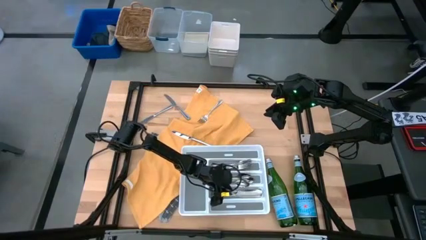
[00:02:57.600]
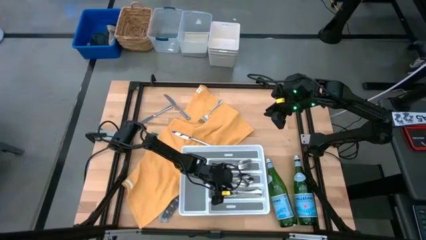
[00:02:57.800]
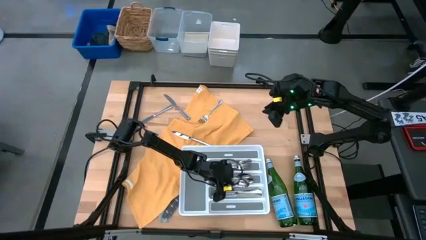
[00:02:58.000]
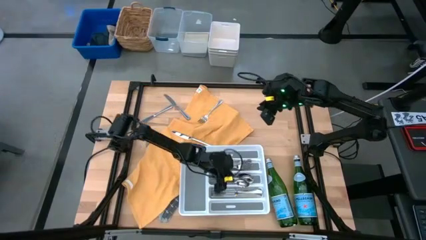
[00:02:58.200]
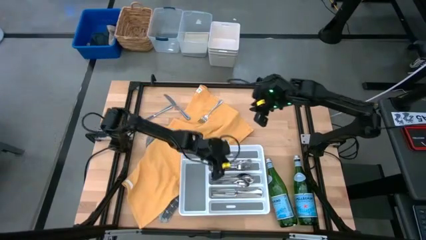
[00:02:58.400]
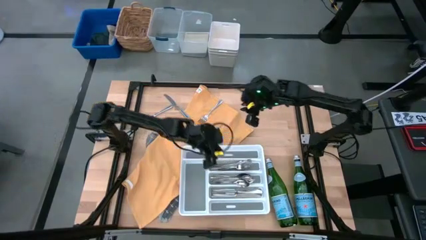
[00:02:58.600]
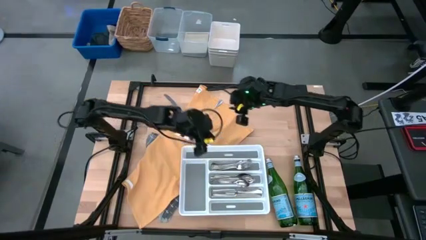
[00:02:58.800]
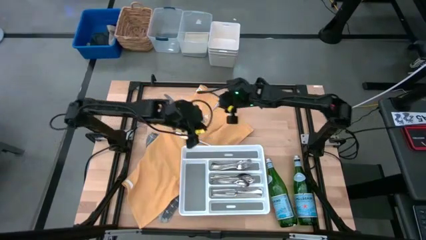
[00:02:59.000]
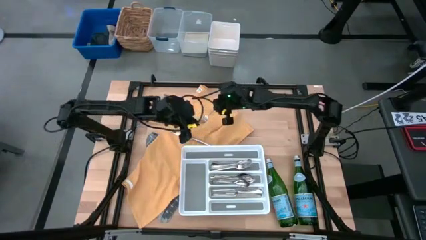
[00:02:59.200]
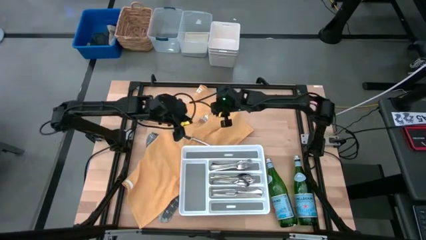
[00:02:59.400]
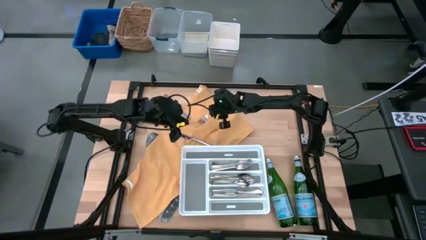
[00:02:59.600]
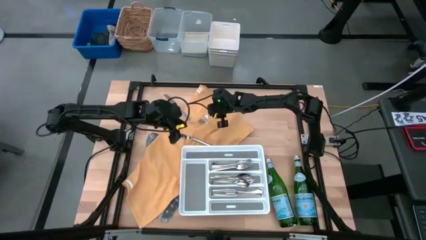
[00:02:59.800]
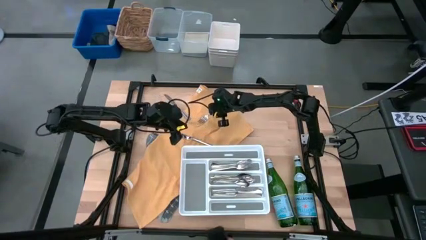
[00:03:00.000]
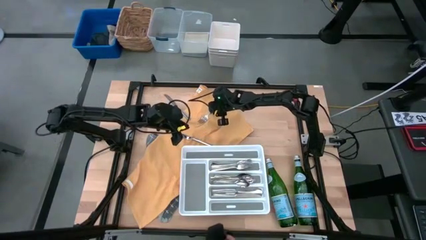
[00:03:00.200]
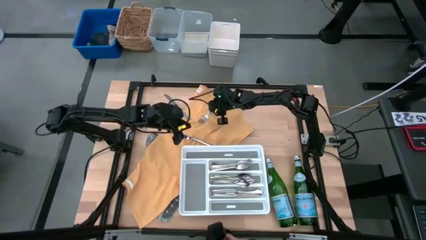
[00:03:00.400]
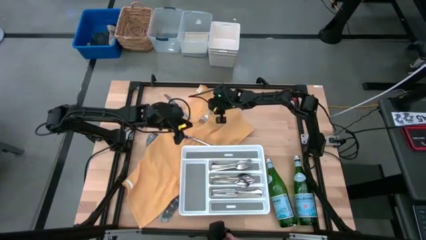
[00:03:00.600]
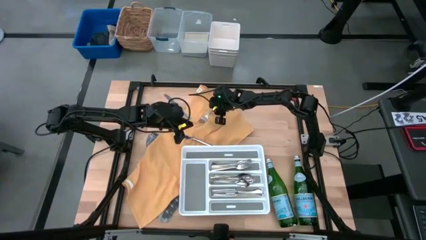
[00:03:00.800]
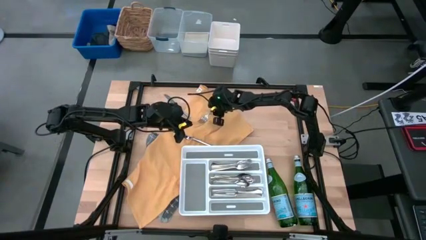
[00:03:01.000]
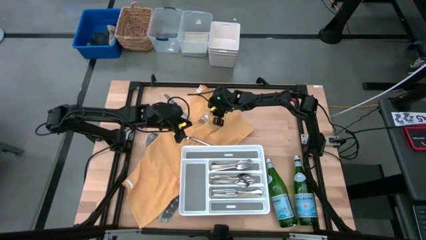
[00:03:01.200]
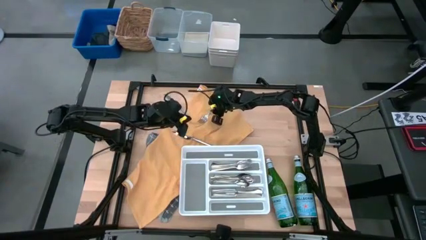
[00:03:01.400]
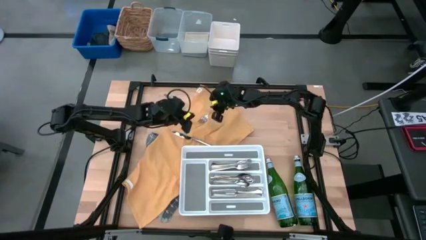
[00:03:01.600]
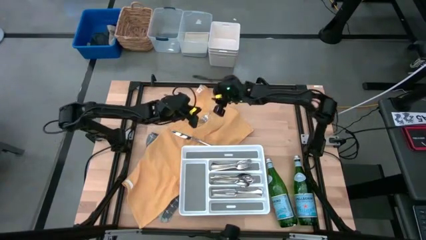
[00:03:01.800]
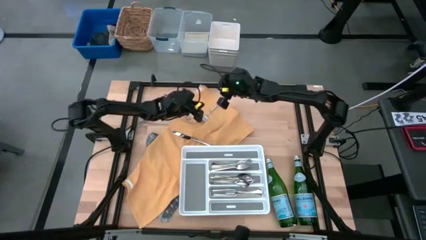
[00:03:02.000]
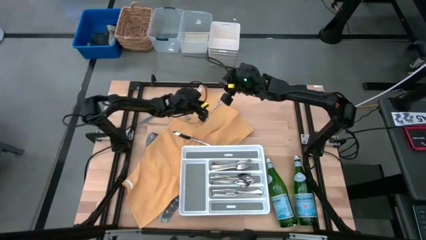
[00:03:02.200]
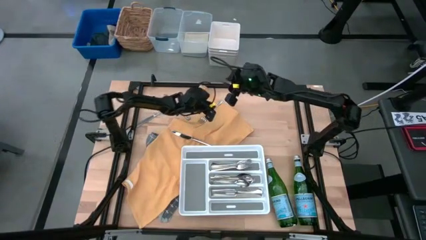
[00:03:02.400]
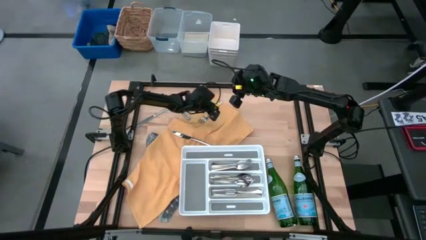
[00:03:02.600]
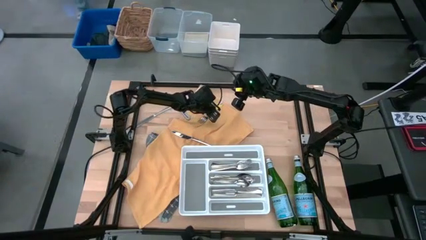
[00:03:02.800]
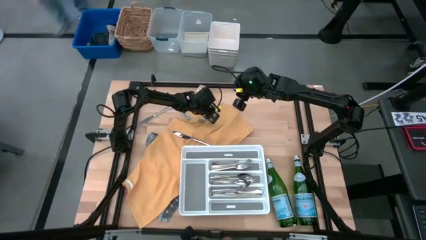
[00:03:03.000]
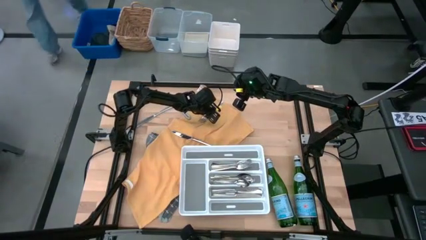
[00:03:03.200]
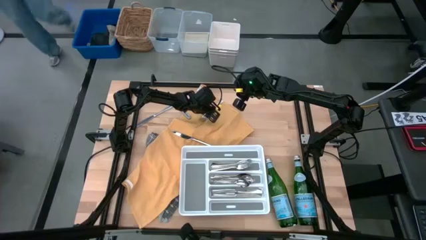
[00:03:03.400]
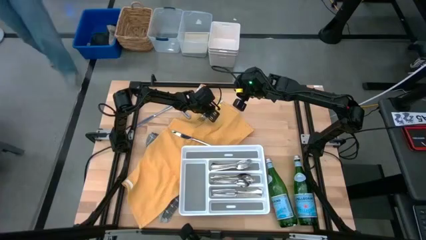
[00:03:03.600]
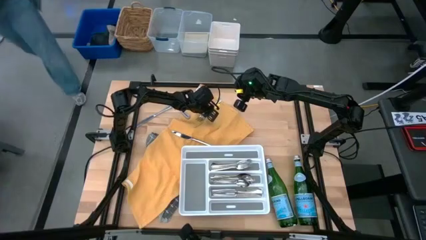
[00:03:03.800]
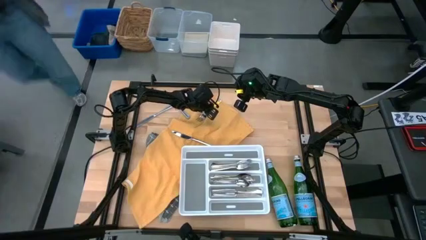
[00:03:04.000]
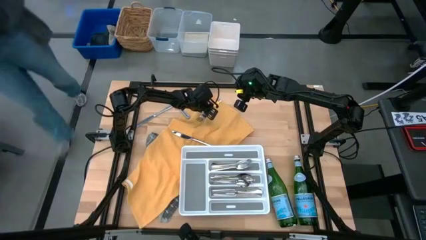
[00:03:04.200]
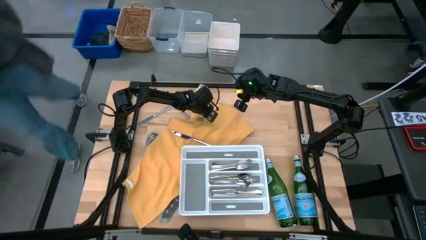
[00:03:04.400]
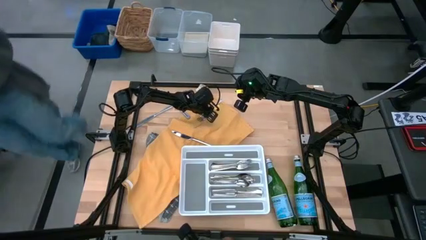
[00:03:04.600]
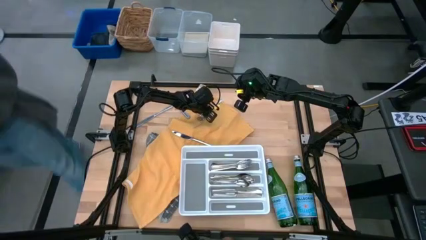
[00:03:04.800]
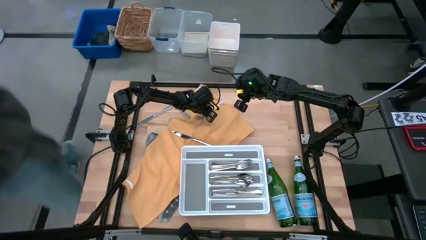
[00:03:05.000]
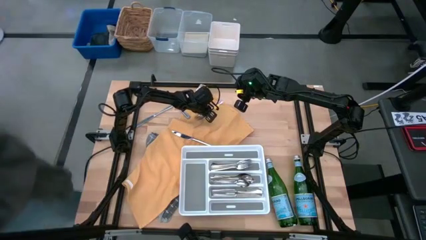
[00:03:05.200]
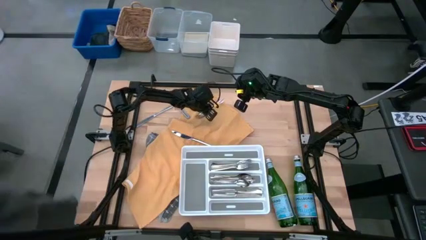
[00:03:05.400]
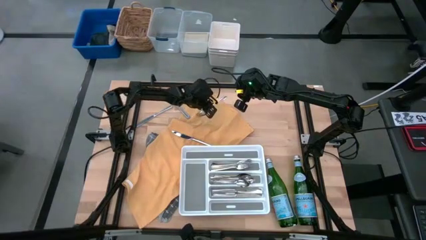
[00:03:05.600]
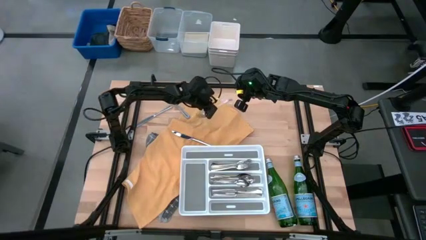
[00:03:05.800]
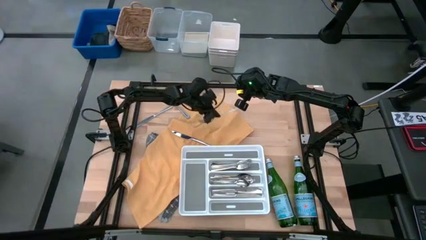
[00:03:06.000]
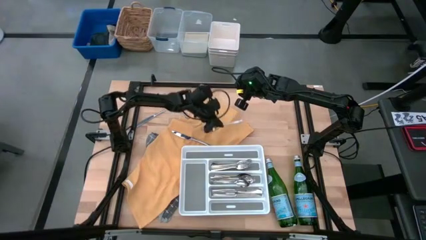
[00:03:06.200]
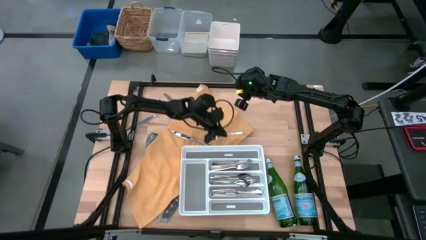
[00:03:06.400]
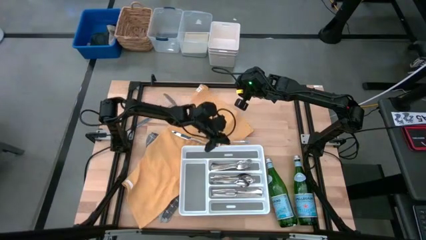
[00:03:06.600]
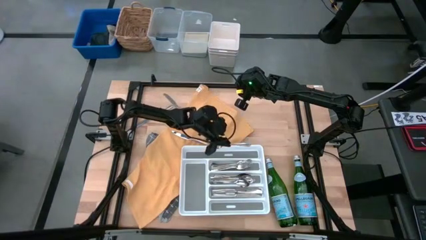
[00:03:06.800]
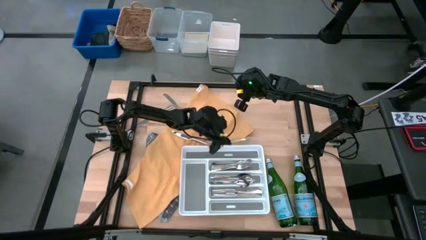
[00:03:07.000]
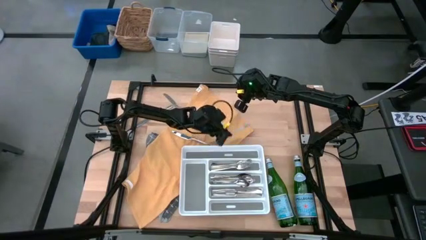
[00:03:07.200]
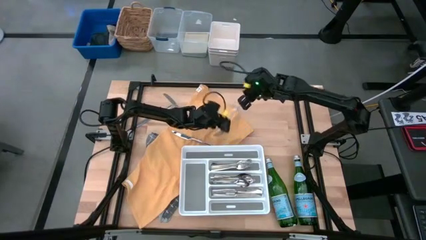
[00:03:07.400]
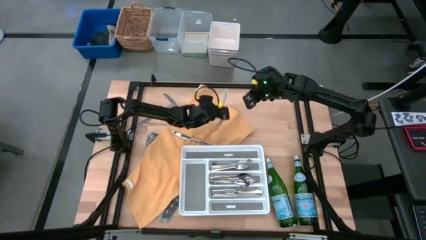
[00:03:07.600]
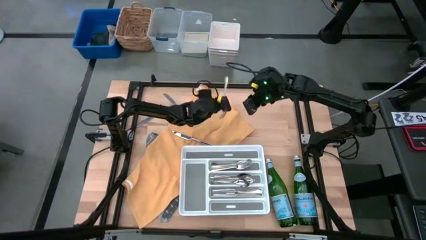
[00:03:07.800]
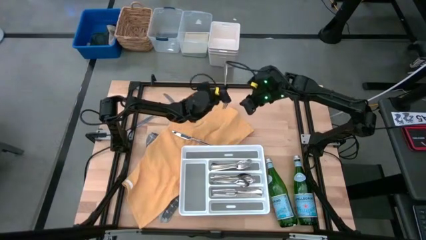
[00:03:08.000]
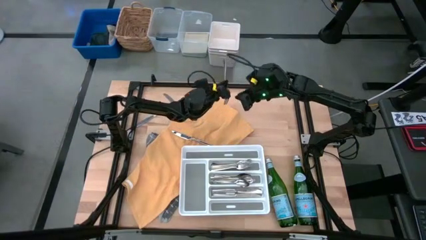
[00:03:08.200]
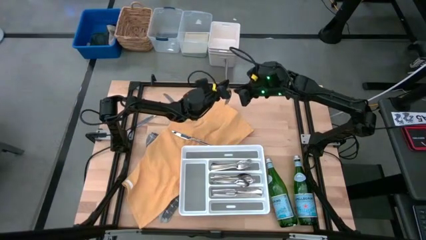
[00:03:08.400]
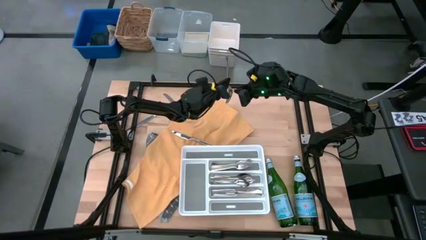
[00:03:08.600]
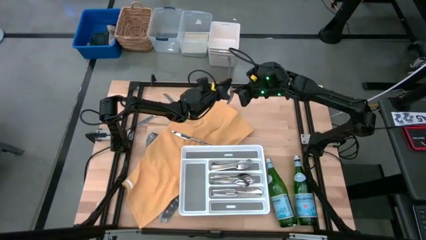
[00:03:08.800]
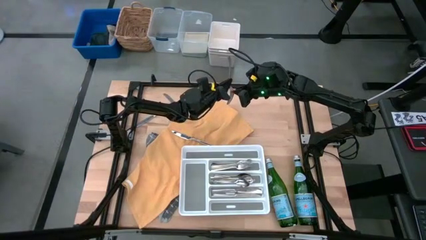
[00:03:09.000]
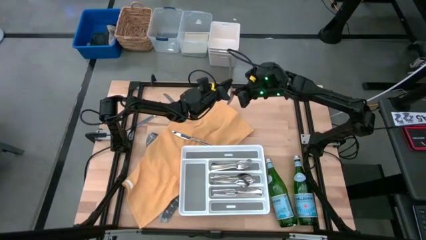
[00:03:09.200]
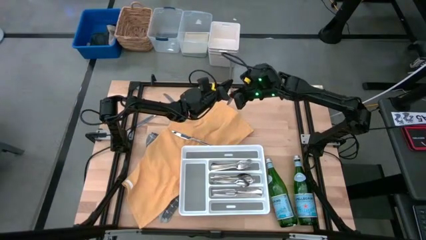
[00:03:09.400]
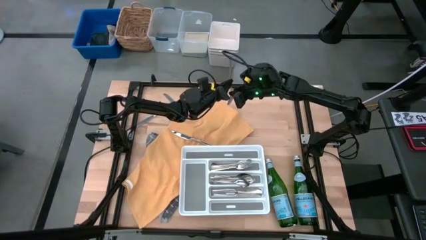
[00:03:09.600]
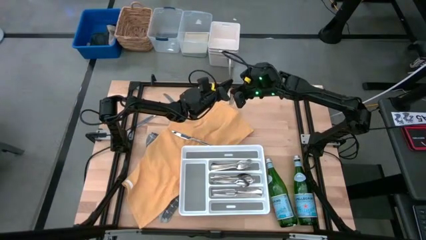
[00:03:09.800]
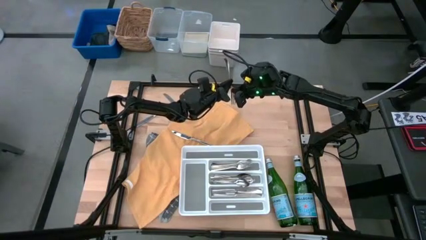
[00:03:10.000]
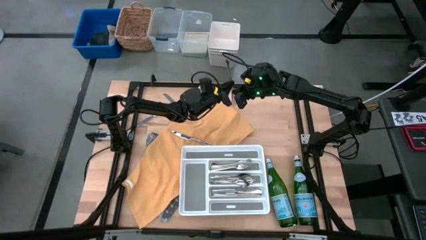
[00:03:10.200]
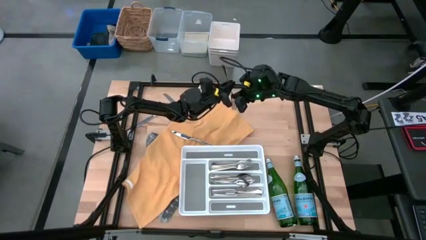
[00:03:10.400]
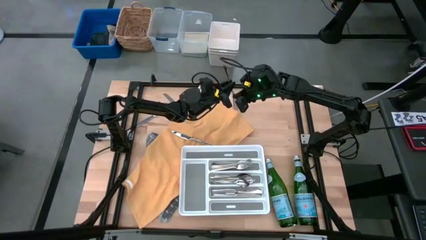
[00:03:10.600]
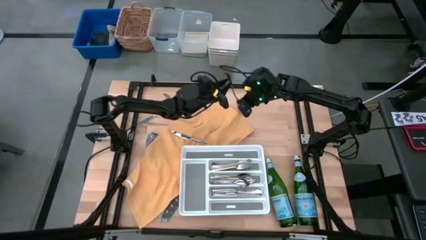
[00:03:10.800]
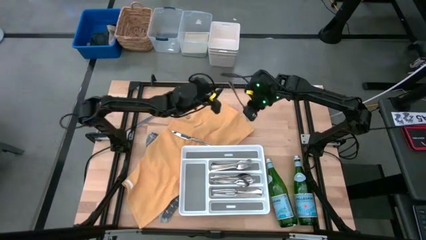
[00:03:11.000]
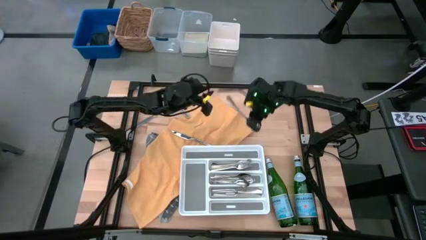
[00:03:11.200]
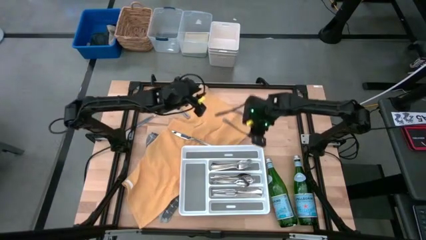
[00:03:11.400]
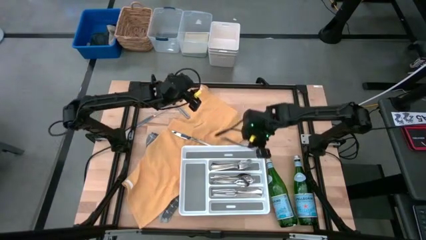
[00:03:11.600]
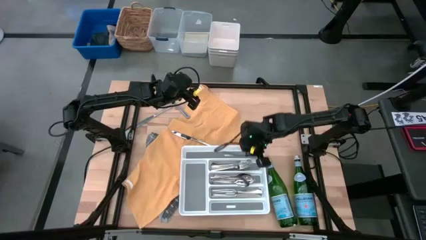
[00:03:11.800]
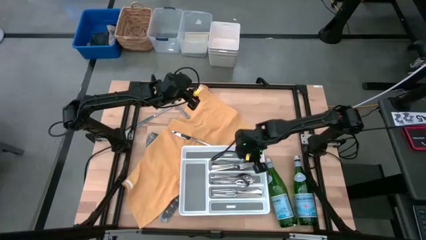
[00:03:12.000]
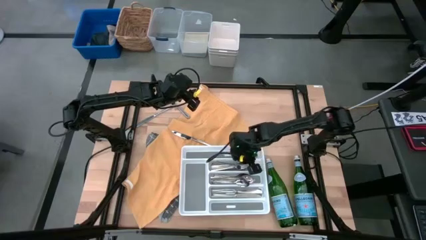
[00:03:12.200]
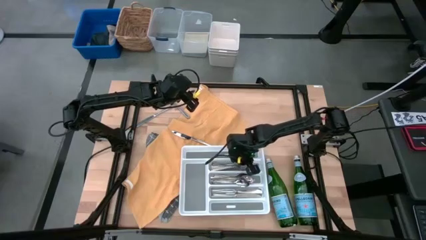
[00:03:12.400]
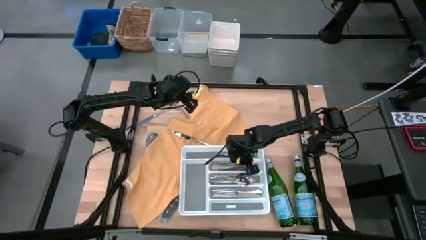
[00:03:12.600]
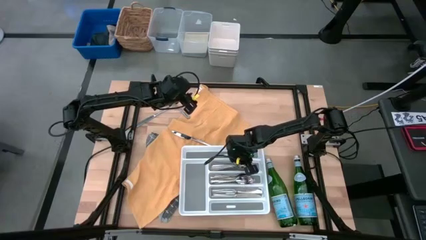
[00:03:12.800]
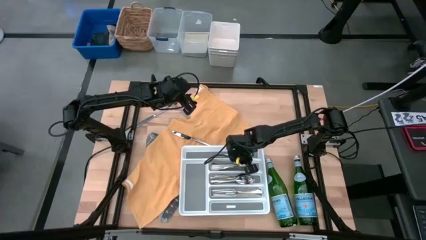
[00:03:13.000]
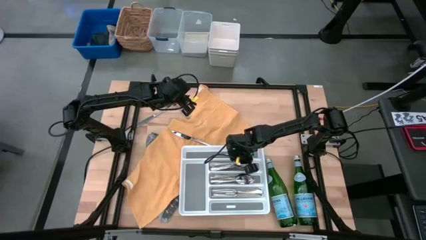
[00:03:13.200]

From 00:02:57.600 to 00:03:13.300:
Task: Sort silverware
Put the silver fork into the white silverware tray
